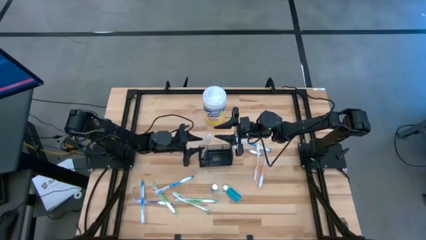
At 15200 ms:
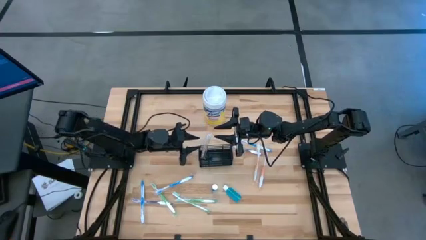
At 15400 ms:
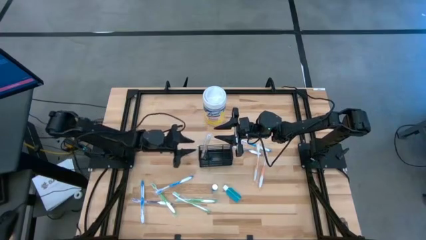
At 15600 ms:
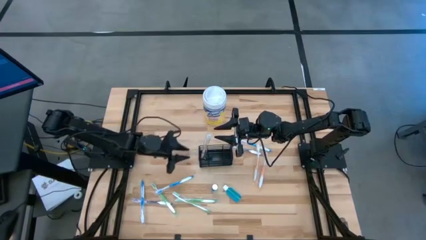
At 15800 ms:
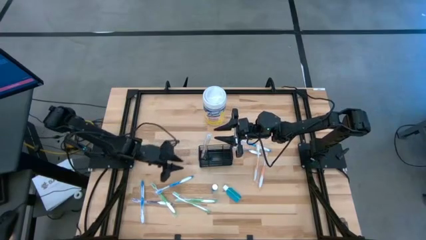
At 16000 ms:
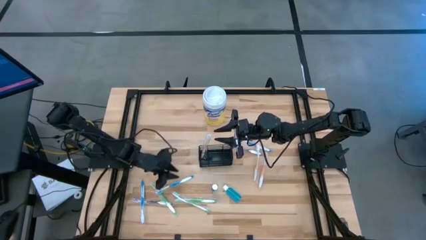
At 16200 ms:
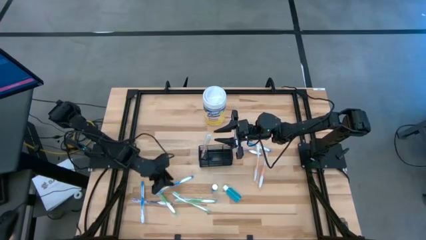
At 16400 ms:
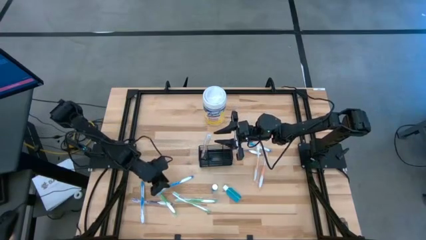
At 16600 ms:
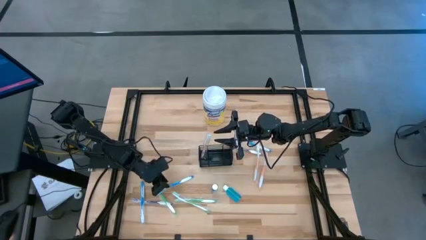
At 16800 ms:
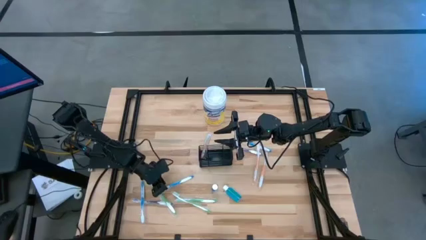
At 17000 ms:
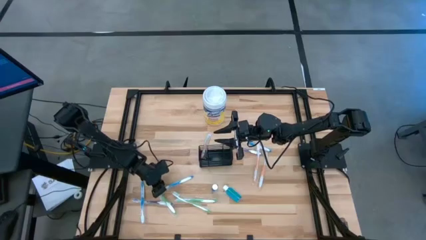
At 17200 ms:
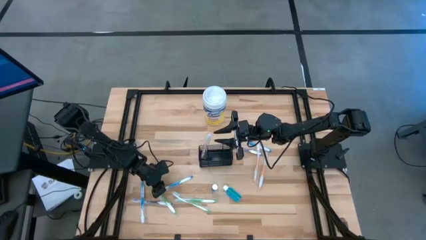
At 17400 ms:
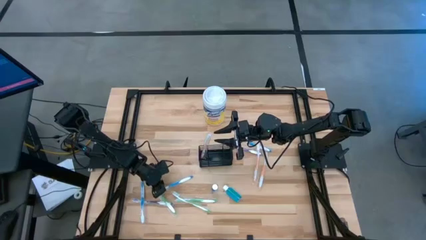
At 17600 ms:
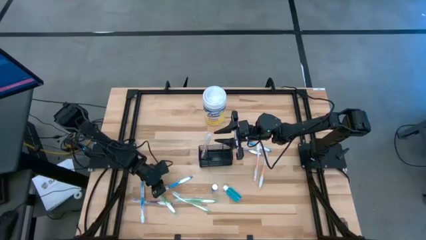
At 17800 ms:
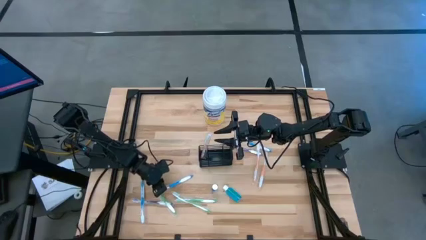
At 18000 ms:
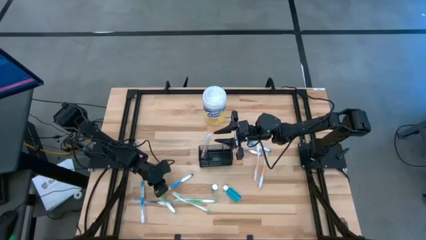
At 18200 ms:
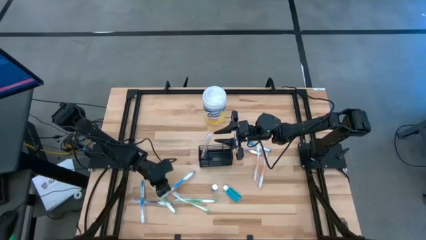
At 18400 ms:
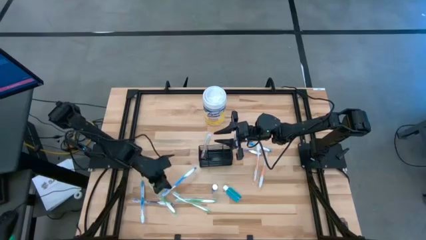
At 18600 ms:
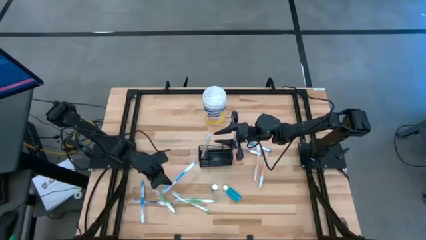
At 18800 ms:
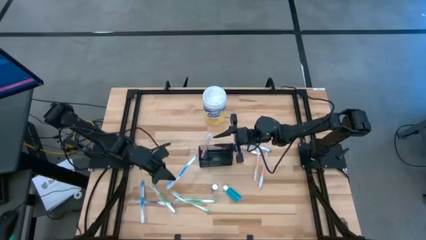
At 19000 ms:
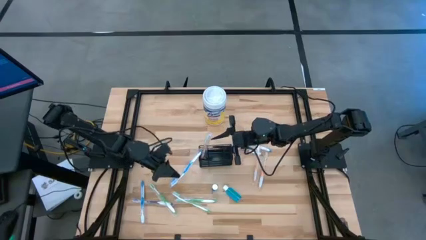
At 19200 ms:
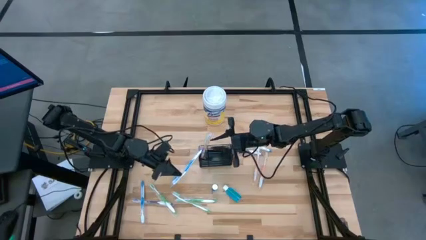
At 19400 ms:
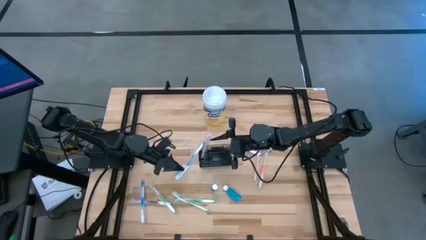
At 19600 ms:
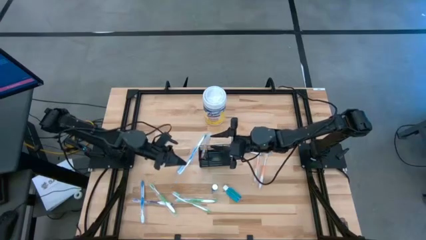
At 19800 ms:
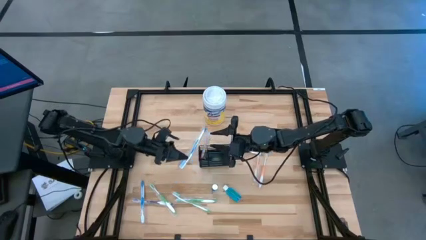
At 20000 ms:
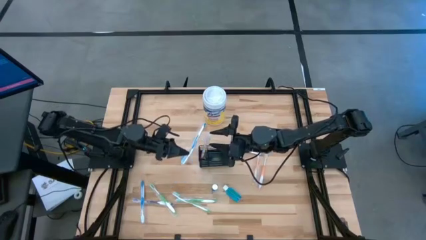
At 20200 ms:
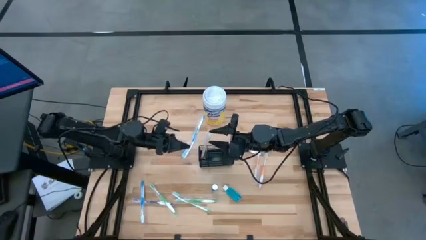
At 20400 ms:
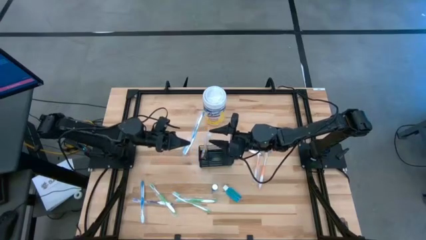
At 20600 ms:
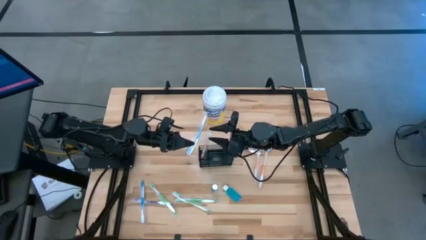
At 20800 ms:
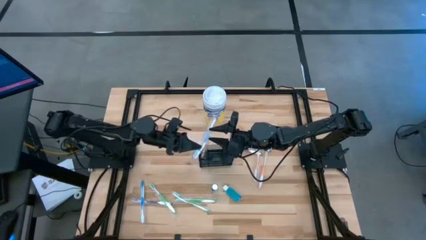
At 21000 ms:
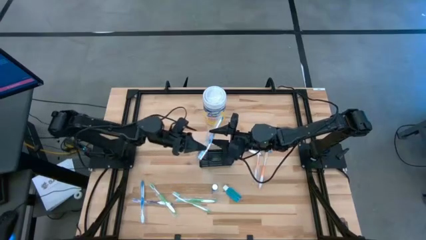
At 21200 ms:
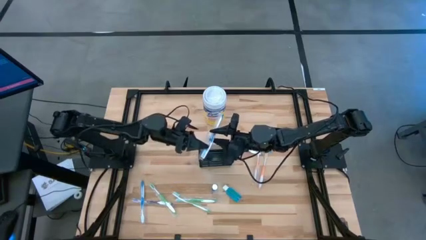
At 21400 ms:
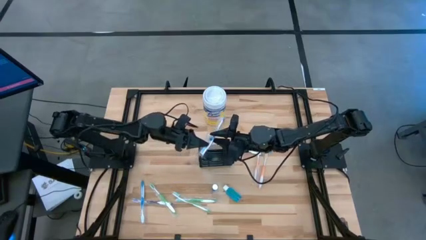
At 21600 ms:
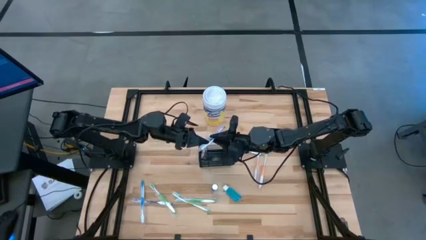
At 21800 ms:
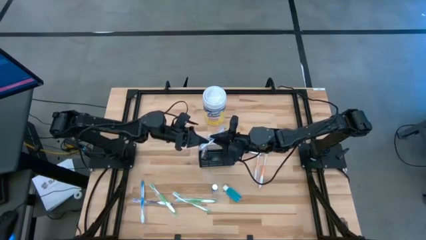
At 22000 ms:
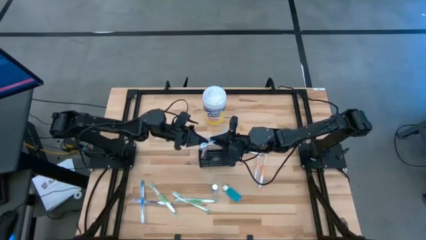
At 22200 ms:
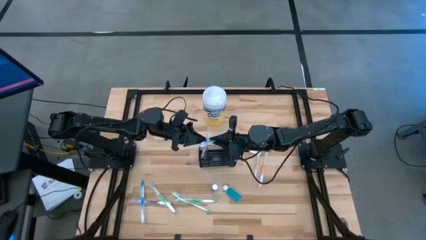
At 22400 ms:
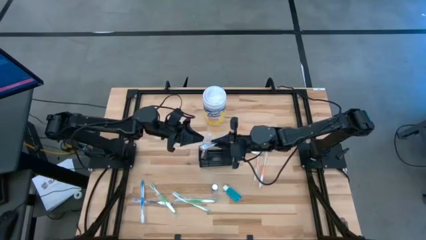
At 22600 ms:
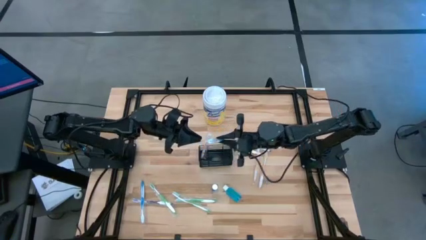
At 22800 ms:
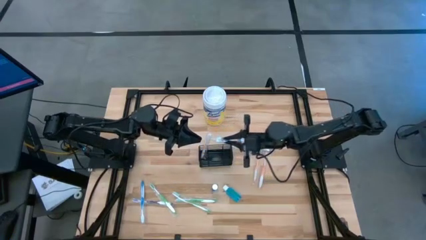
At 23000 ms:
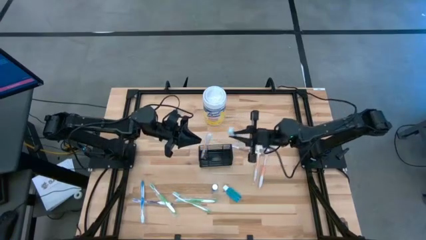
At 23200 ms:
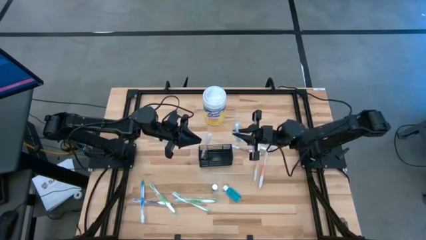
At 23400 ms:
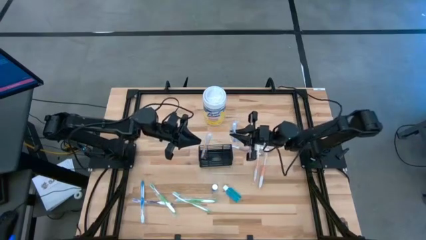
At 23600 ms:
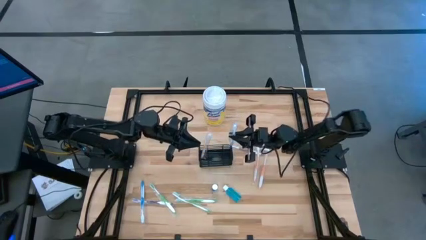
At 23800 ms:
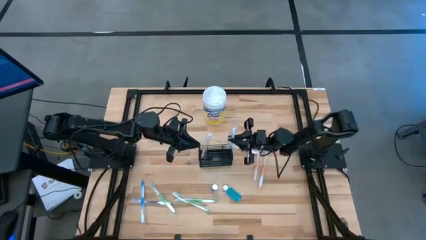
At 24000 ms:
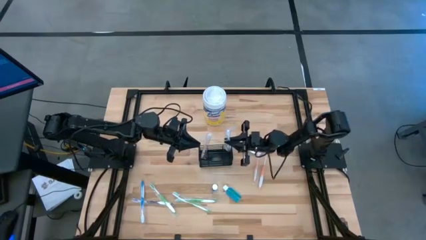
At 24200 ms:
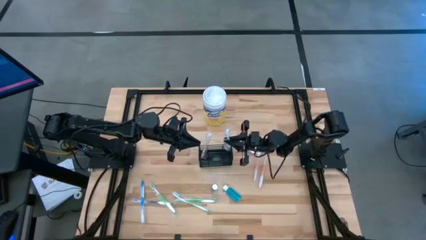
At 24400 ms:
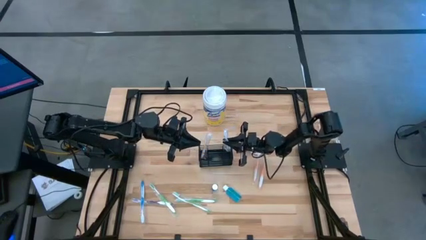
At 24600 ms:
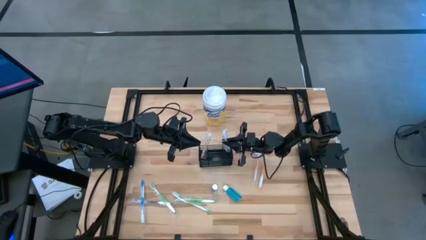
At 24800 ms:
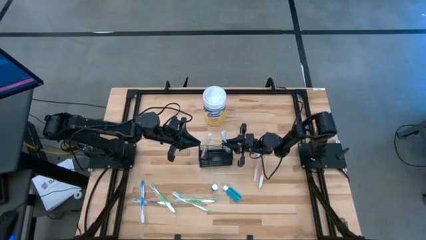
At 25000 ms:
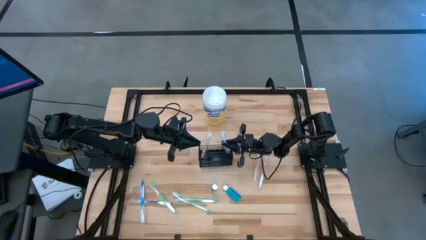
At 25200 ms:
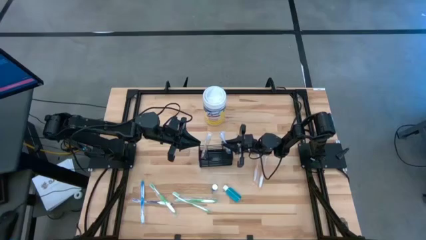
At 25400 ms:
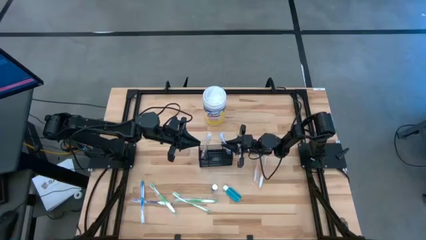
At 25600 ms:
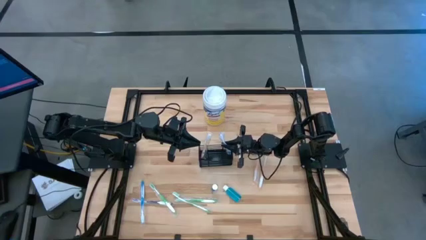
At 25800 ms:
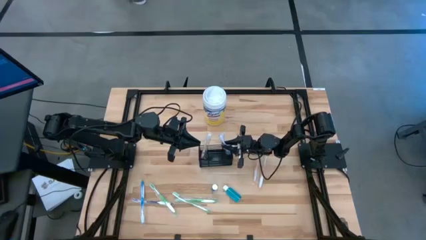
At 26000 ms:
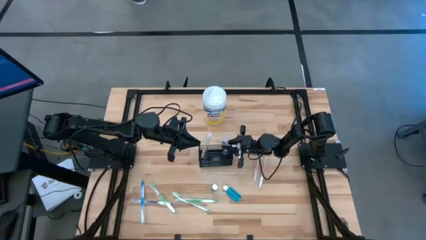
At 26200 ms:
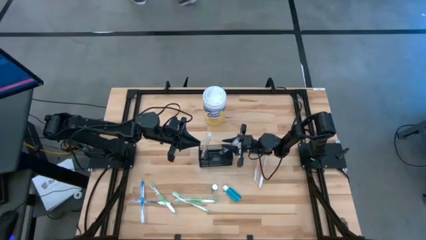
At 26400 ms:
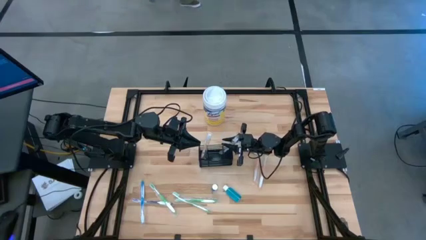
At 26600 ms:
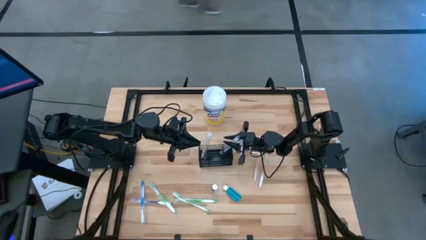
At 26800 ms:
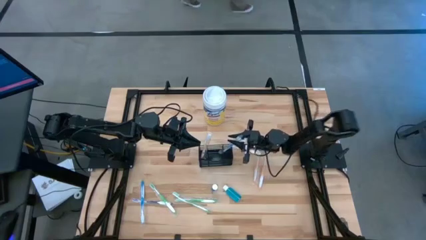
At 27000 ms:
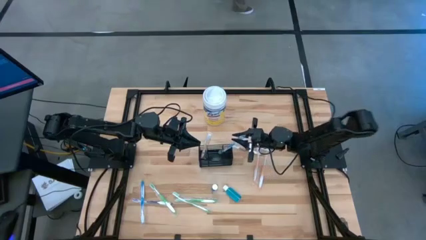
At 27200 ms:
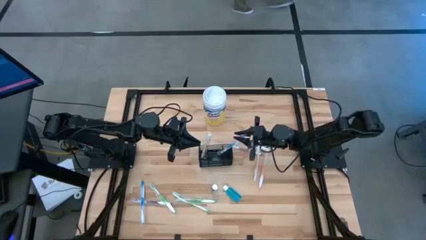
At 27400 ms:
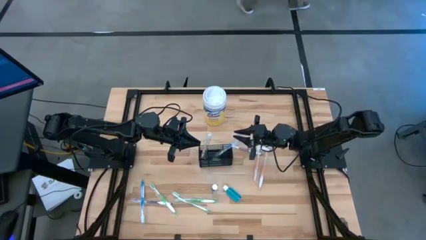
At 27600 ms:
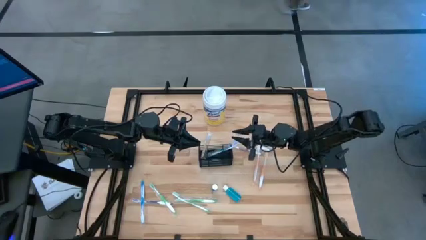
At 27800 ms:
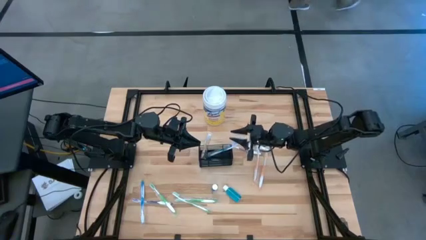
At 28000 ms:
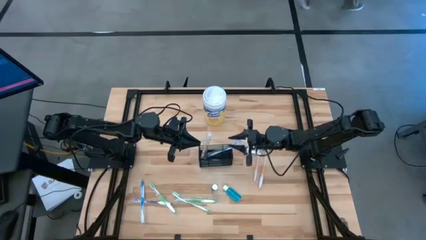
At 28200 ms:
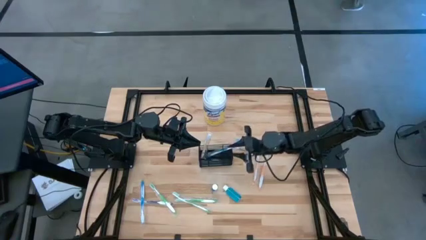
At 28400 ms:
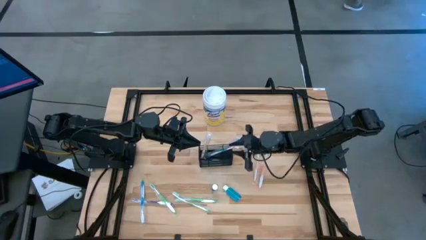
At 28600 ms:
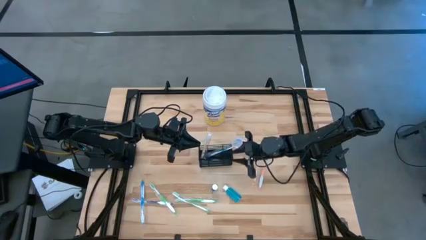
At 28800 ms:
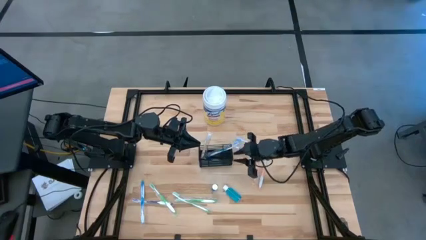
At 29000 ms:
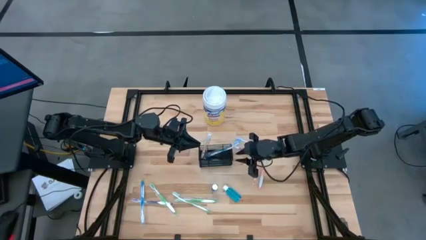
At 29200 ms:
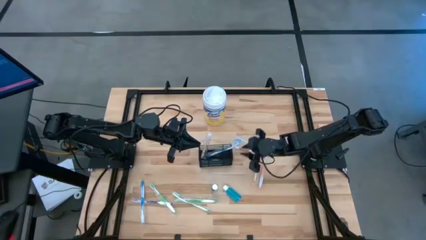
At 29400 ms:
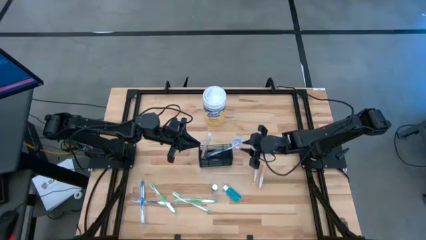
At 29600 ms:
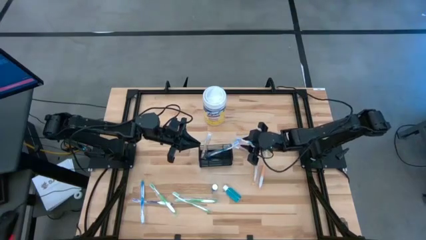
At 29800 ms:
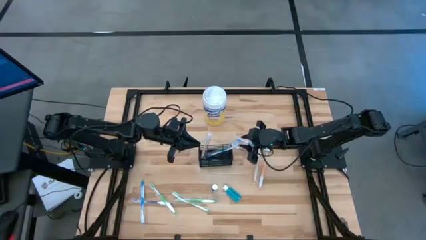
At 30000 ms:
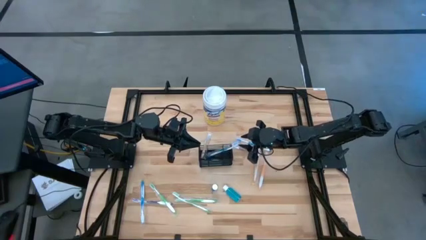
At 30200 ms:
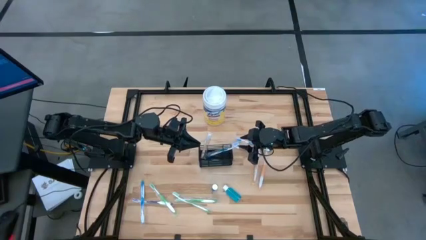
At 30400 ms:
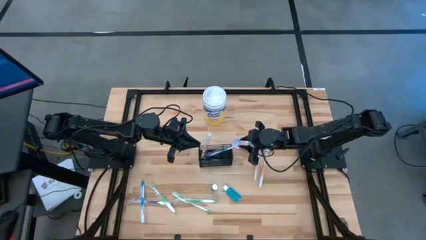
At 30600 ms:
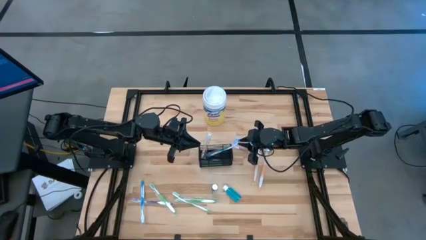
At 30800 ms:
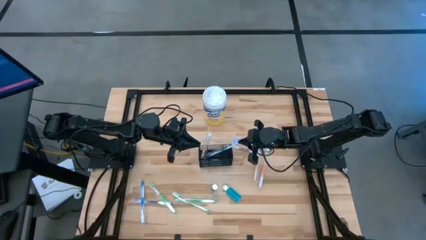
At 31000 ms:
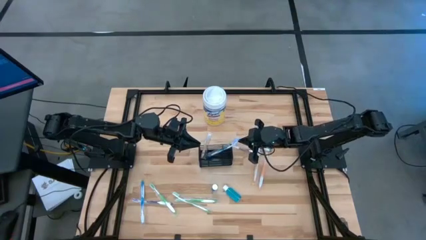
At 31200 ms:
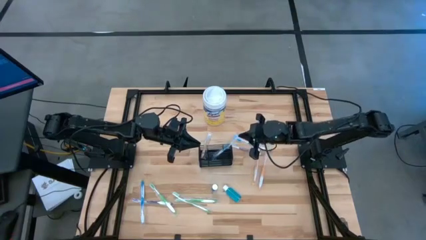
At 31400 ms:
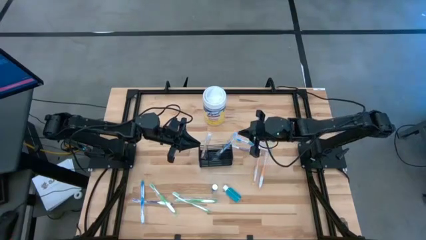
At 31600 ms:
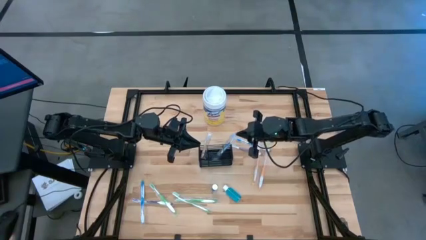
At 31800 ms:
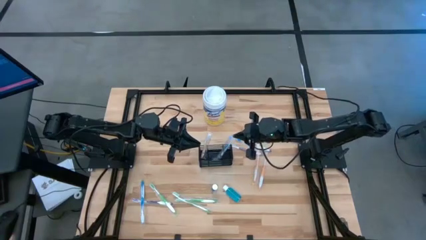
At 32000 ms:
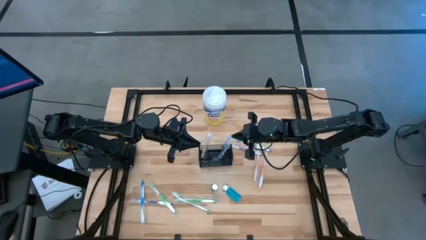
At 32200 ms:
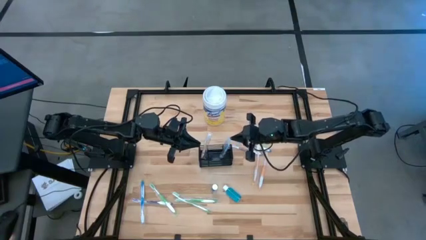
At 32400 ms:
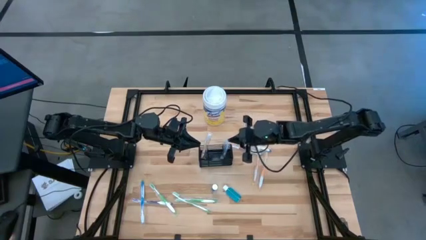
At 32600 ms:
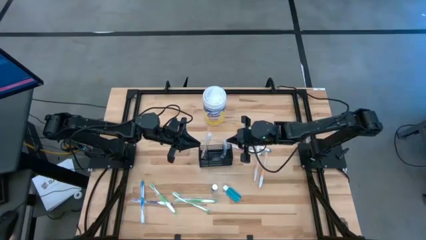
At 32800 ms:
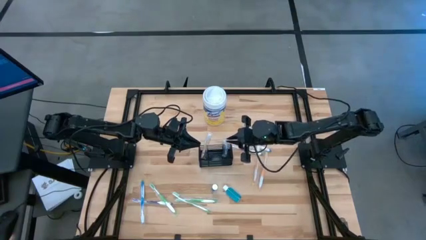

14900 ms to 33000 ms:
Task: Pick & Place toothbrushing station
Put the middle blue toothbrush into the mesh organizer
